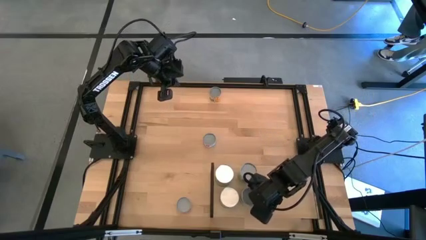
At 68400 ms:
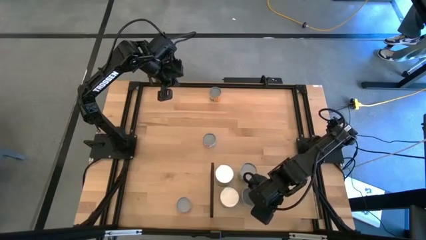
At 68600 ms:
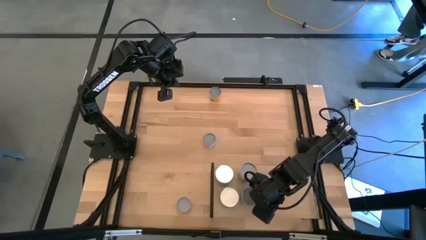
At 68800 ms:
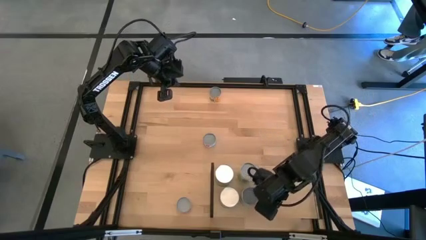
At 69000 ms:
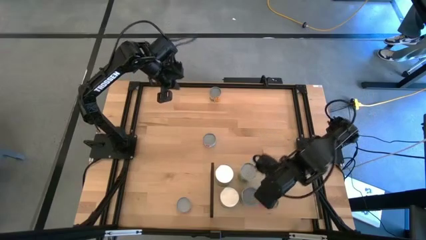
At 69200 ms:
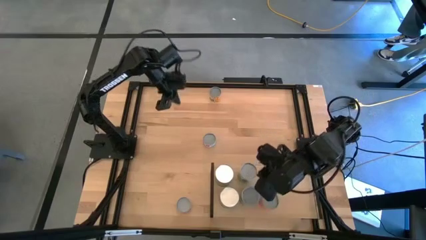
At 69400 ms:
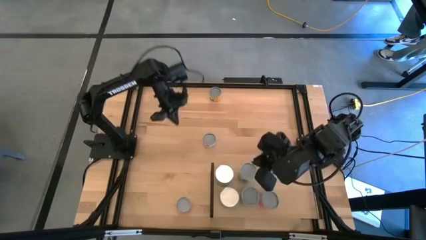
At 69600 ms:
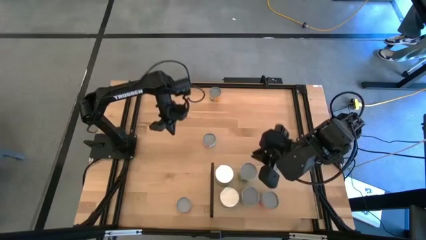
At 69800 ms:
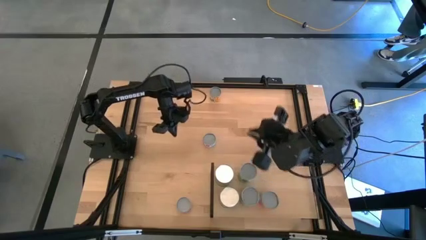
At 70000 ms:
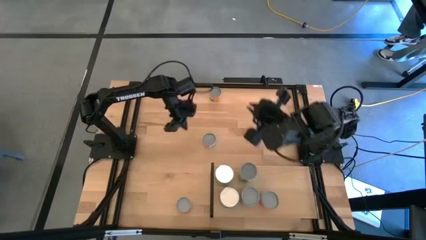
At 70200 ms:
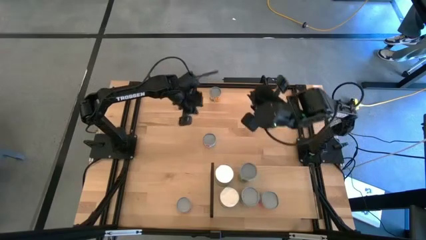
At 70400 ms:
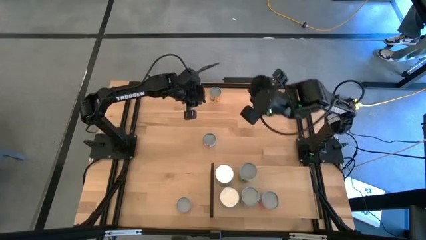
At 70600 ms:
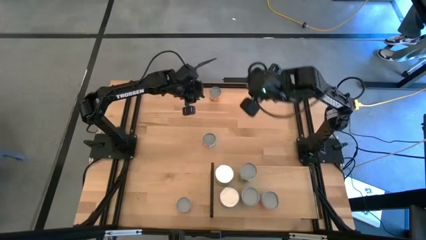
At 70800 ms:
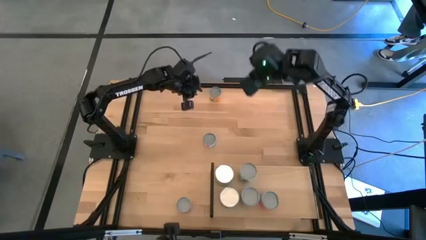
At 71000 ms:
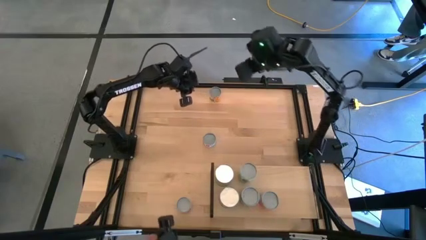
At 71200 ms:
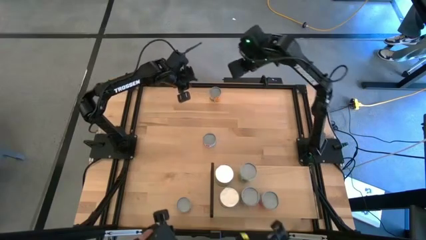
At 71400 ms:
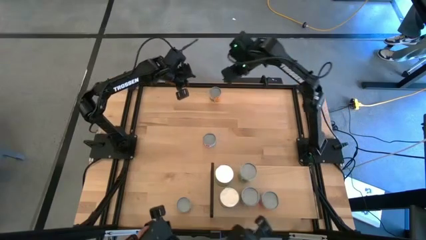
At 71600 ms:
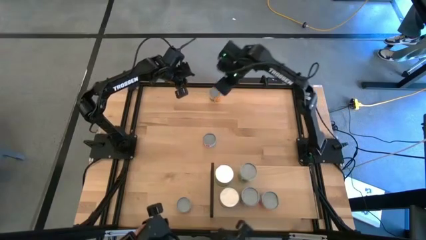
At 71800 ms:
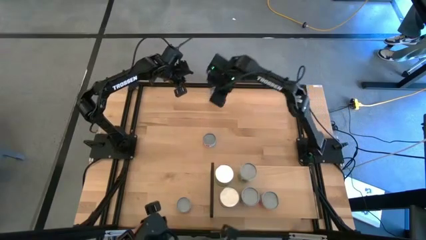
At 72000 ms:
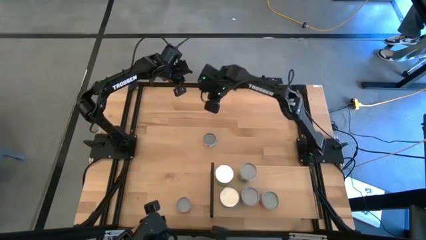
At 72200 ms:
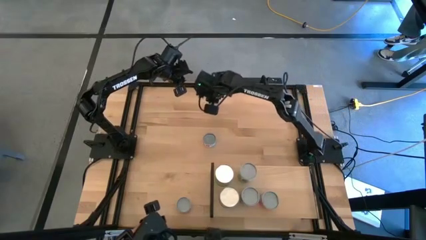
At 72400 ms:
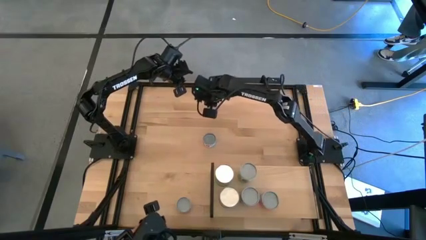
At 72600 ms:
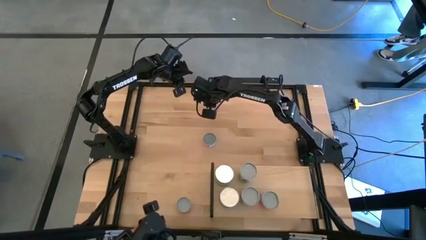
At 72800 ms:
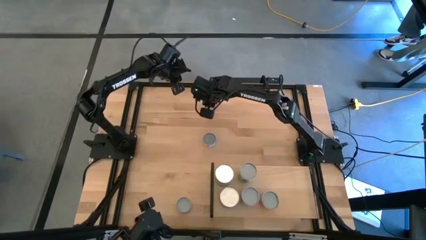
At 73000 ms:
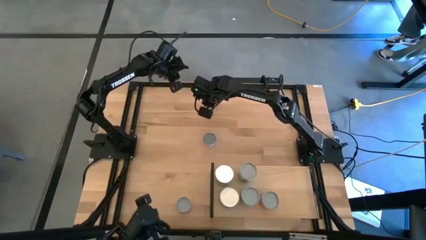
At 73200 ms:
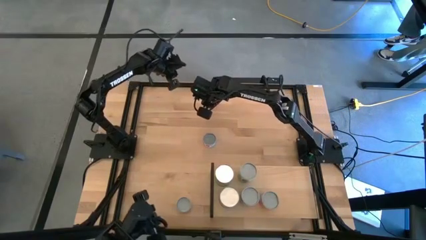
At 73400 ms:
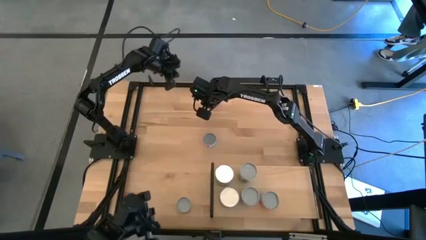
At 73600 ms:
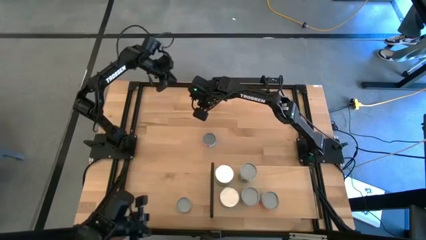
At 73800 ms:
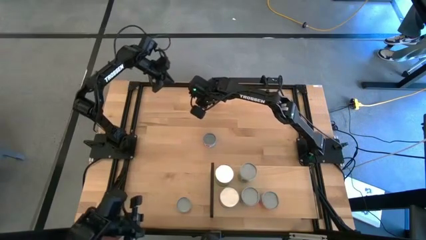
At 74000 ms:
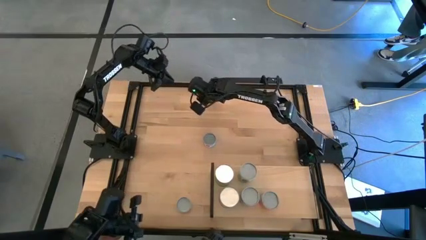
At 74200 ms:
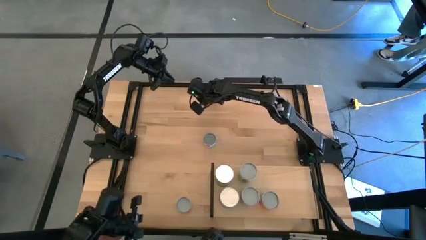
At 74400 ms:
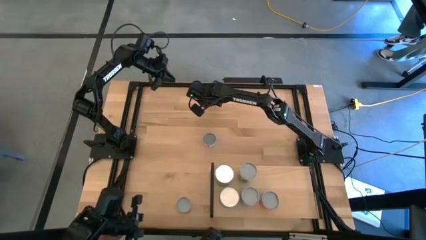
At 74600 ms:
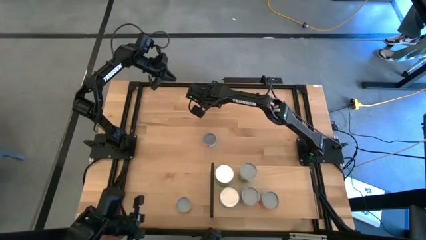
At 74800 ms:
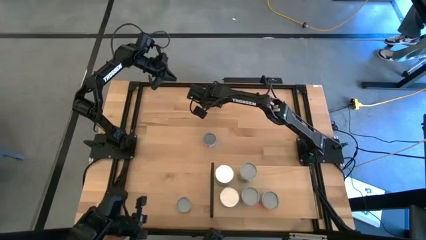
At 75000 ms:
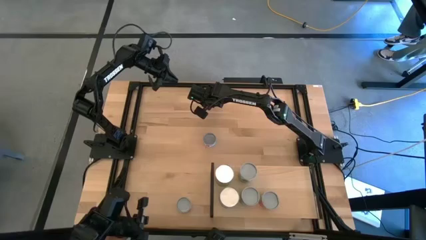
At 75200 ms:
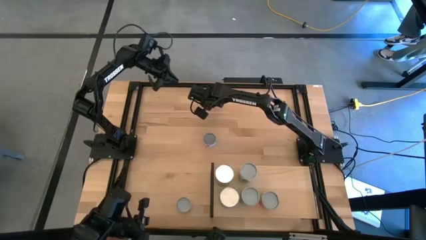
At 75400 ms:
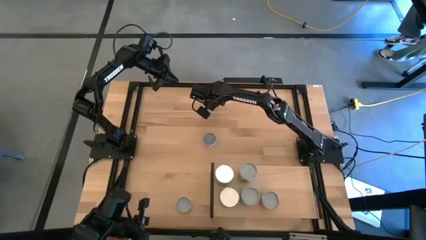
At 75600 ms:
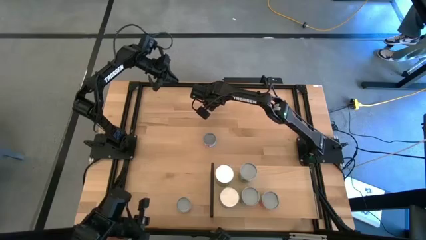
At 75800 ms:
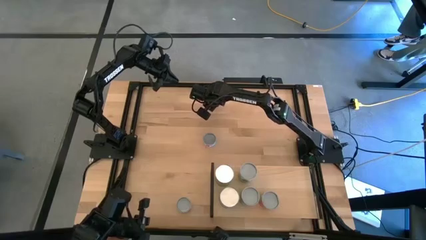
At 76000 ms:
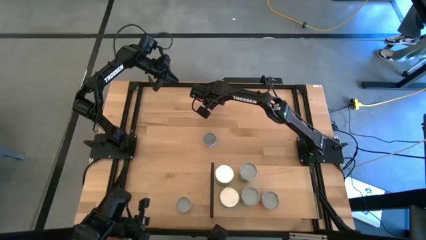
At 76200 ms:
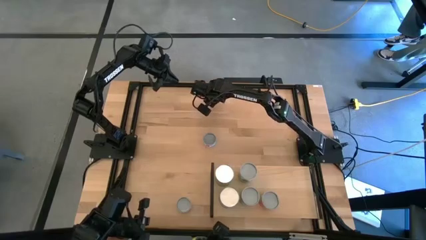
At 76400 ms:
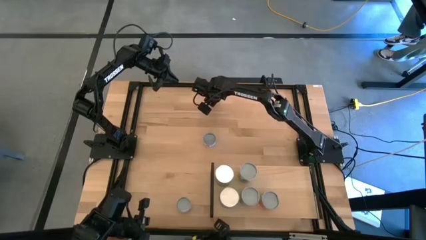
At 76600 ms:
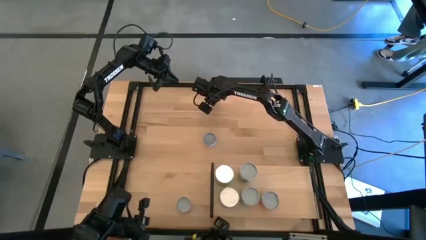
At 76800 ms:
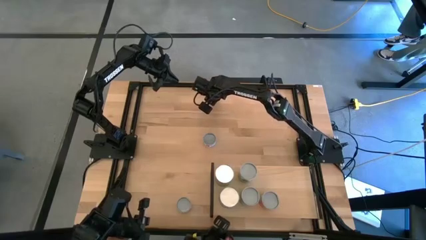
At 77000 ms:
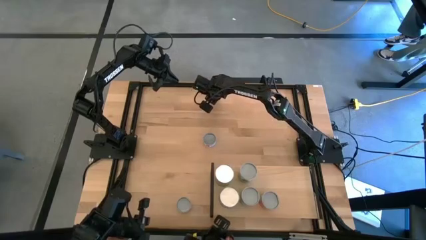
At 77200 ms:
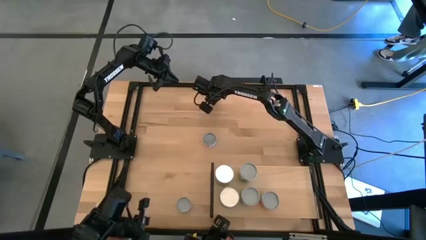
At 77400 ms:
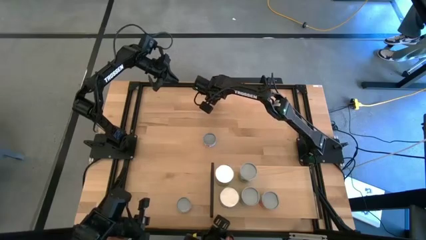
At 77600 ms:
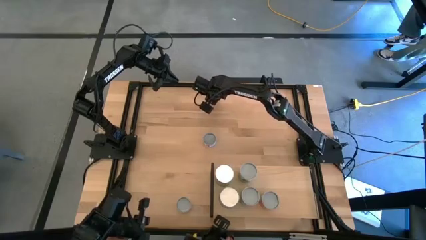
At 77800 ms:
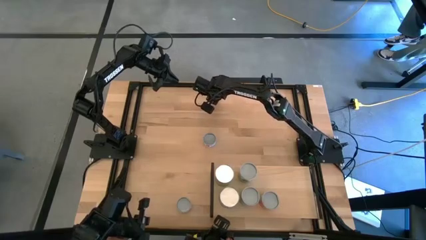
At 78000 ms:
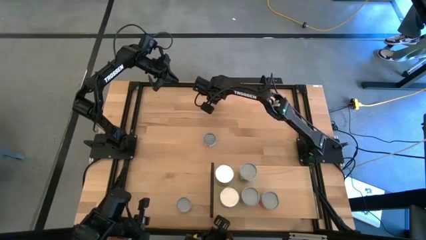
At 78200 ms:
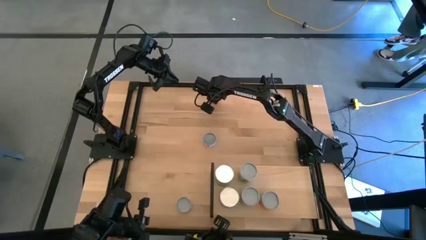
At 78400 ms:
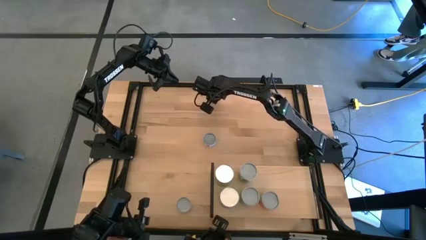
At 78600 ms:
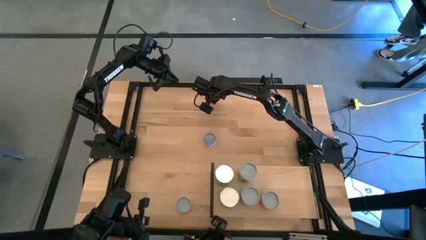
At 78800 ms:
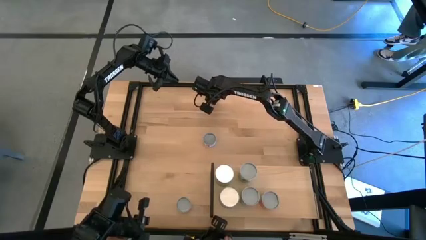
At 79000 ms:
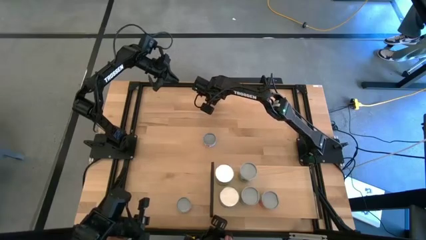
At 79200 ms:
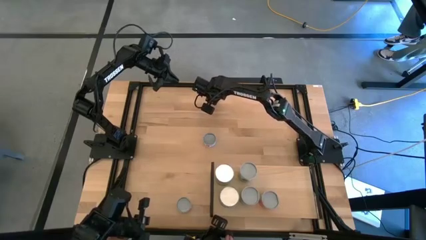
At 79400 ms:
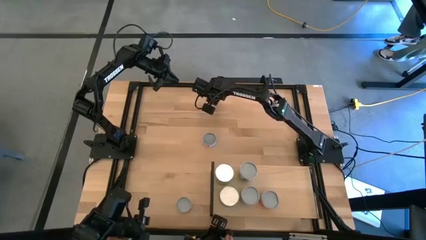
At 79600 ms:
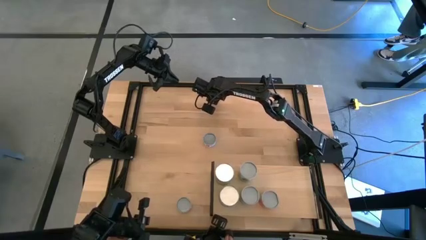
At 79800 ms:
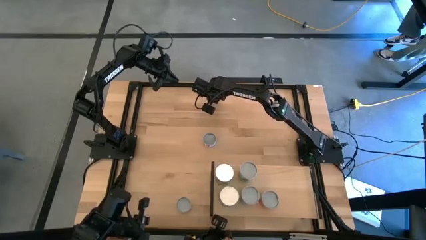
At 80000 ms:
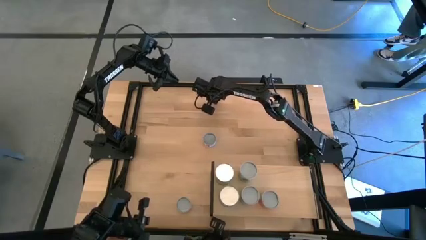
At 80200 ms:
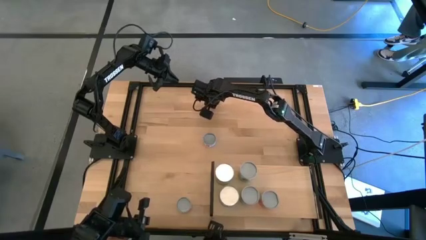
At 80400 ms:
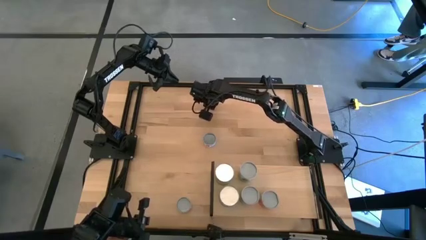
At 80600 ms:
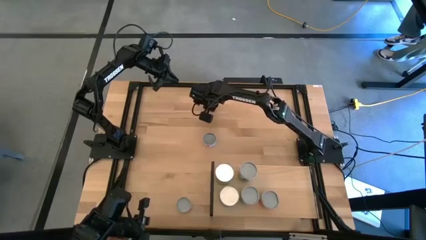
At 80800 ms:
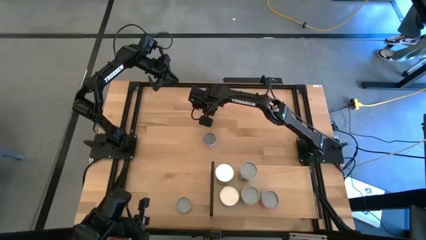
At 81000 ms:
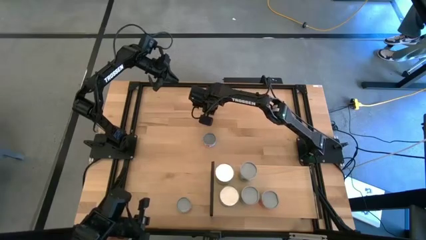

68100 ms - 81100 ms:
Task: Pick and place cans onto a shelf
Put the canned spicy black beans on the shelf

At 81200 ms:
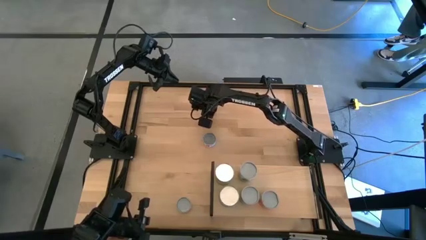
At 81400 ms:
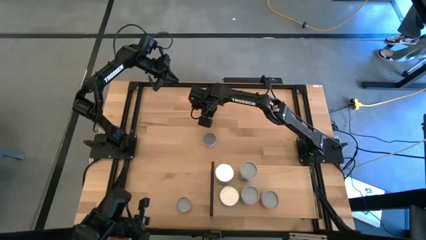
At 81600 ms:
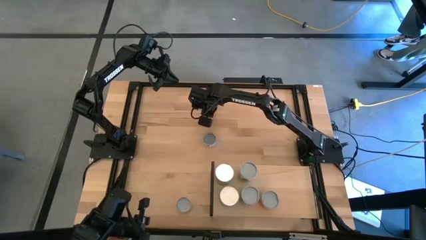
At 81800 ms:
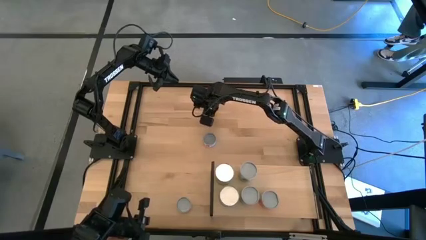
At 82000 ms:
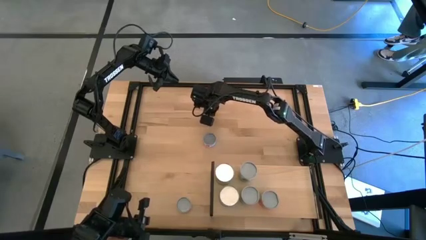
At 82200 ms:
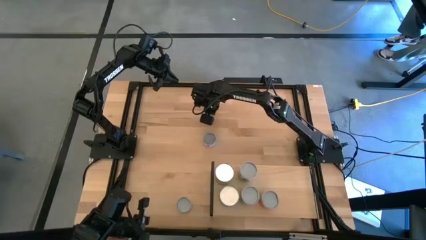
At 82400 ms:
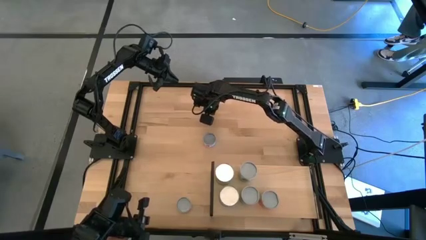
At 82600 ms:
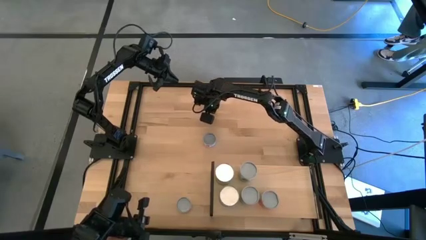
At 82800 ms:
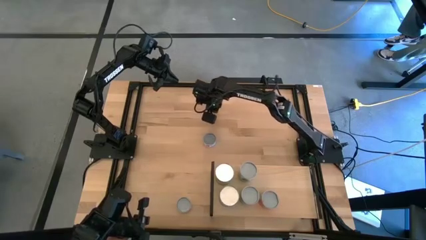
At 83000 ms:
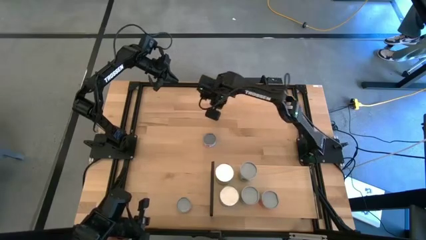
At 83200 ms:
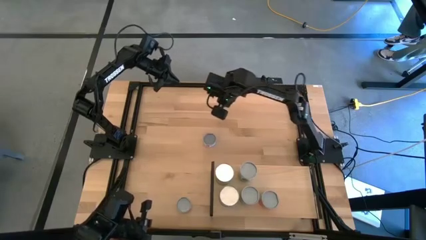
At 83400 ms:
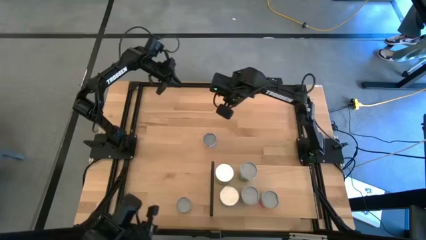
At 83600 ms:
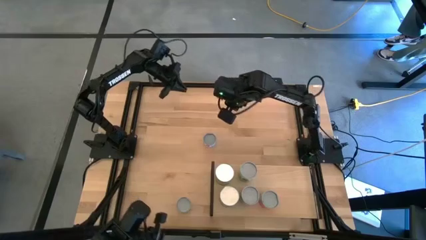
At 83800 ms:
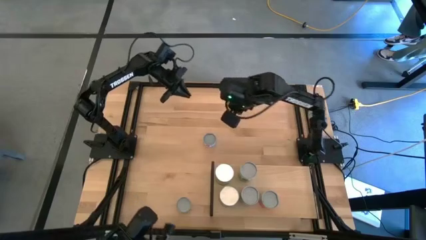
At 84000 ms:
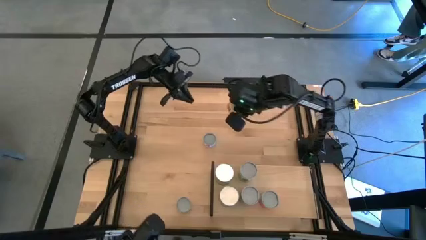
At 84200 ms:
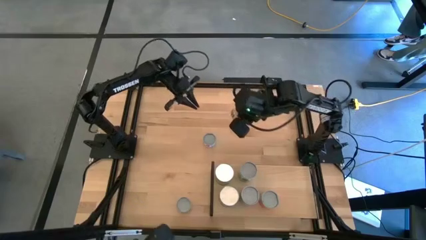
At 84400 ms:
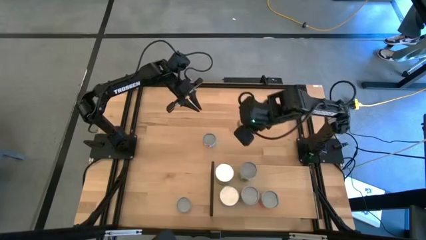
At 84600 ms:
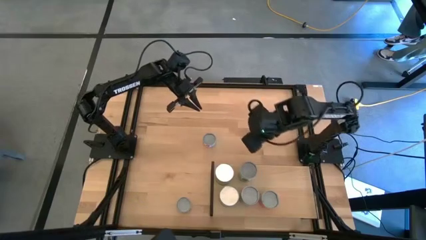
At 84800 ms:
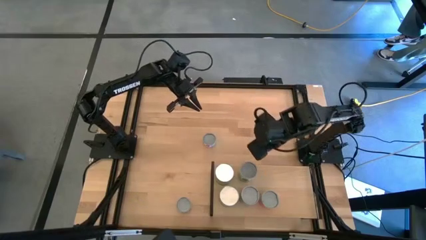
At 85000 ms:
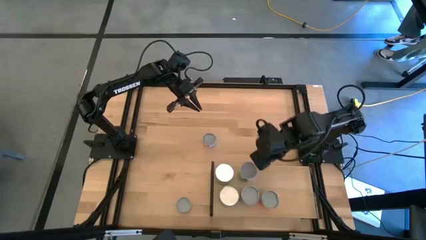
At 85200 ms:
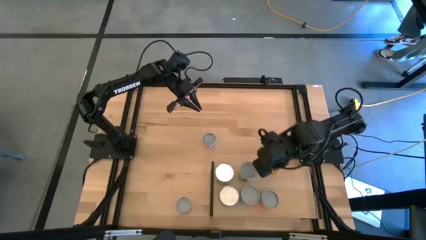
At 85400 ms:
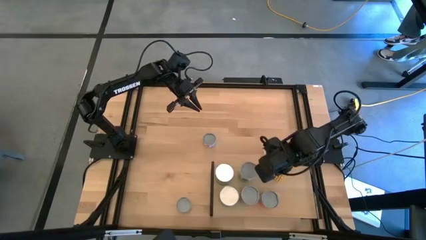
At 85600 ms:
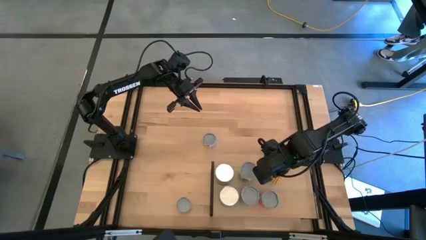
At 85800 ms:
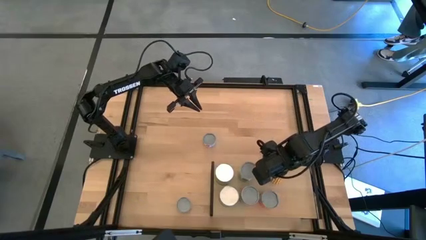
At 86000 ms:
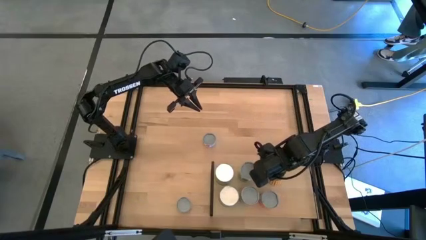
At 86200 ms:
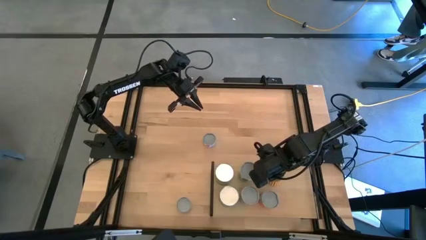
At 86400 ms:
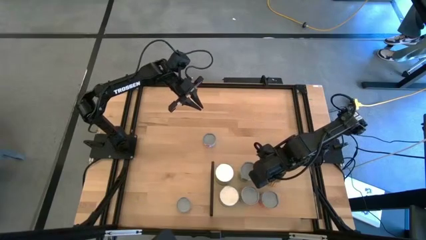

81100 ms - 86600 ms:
Put the canned spicy black beans on the shelf
